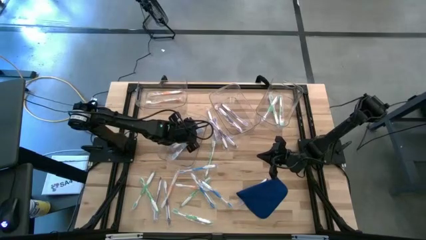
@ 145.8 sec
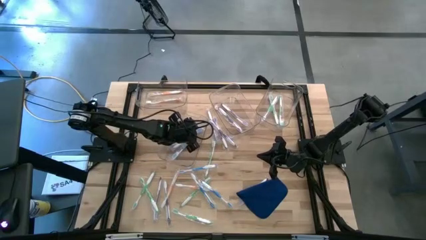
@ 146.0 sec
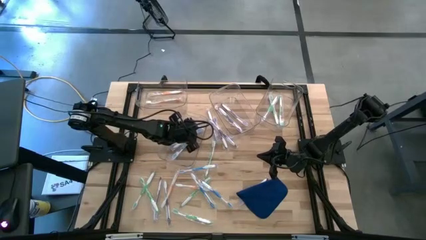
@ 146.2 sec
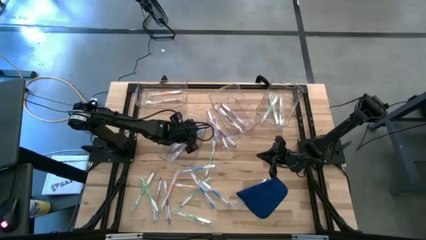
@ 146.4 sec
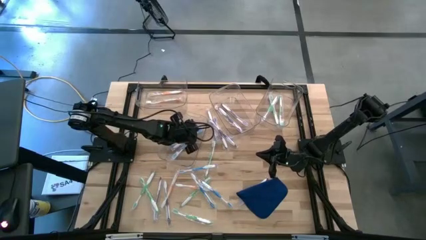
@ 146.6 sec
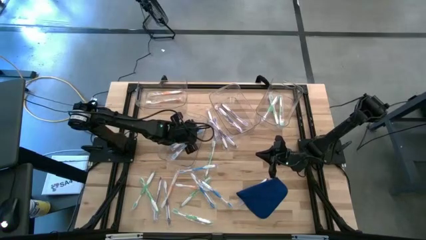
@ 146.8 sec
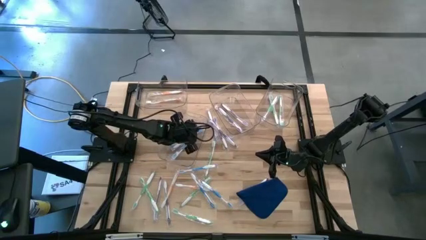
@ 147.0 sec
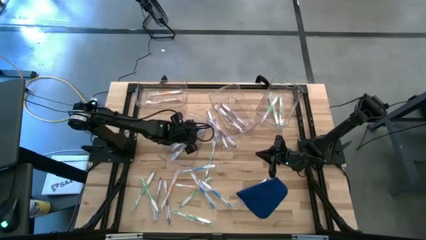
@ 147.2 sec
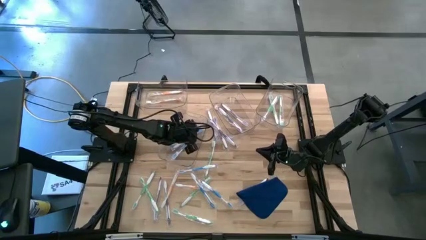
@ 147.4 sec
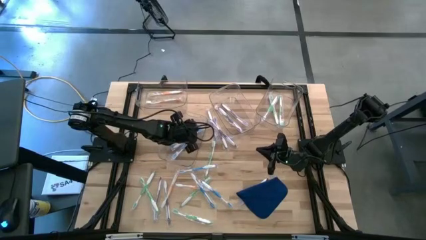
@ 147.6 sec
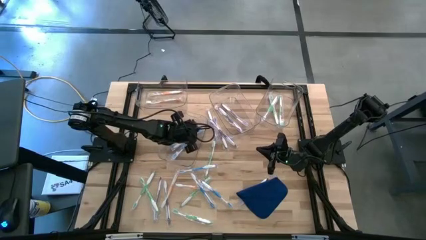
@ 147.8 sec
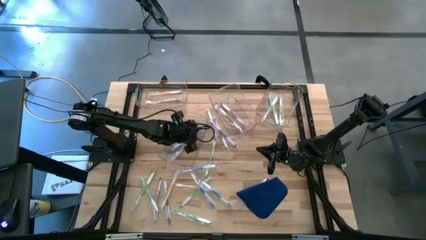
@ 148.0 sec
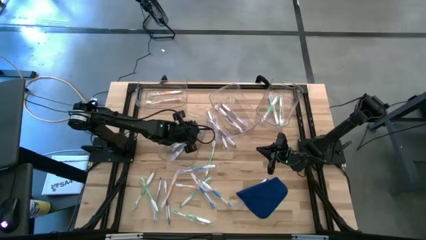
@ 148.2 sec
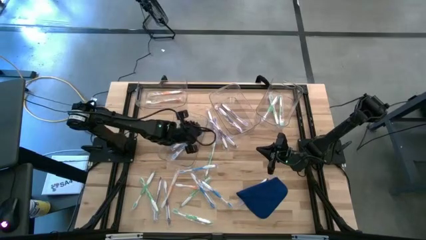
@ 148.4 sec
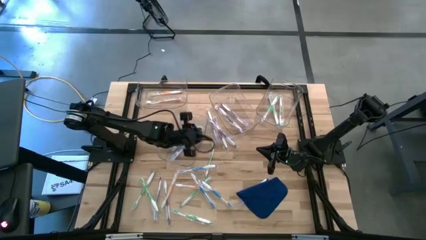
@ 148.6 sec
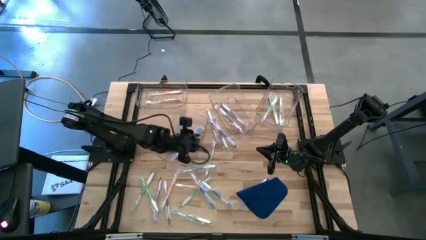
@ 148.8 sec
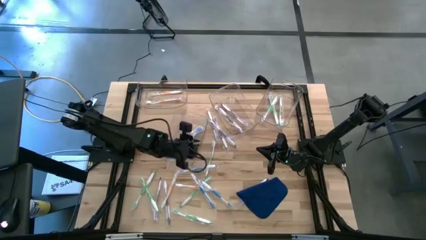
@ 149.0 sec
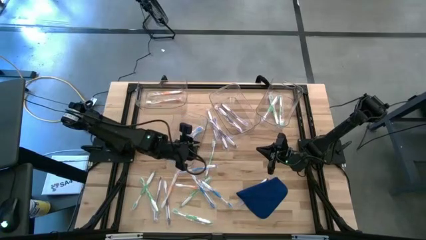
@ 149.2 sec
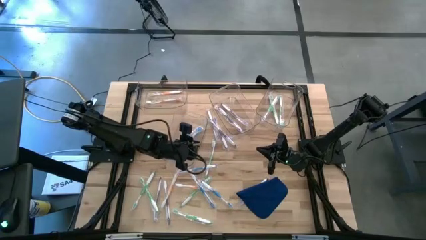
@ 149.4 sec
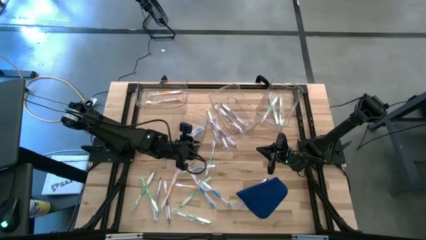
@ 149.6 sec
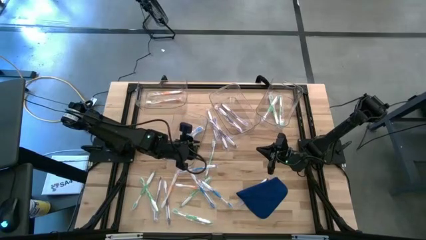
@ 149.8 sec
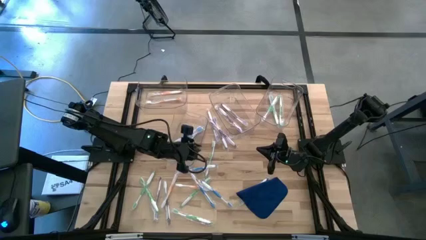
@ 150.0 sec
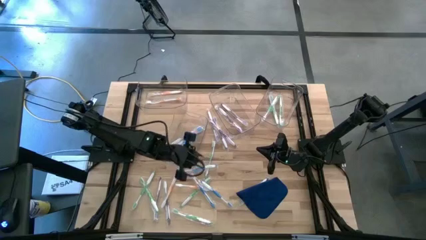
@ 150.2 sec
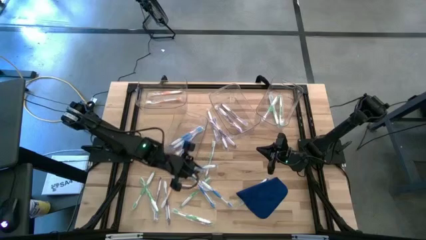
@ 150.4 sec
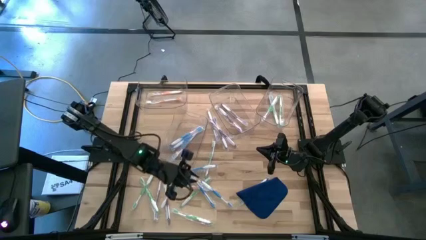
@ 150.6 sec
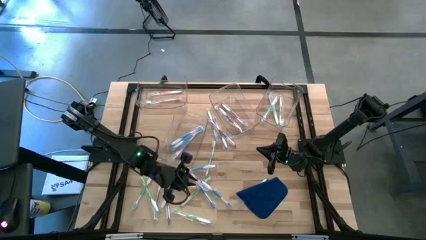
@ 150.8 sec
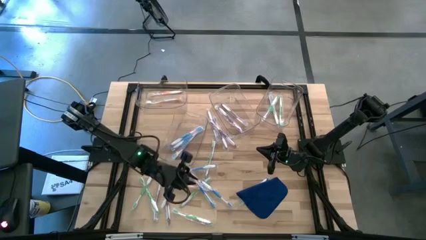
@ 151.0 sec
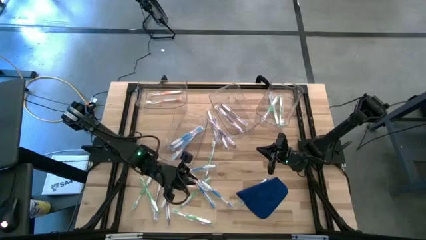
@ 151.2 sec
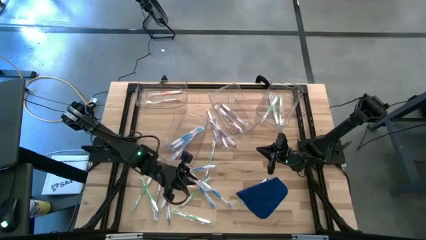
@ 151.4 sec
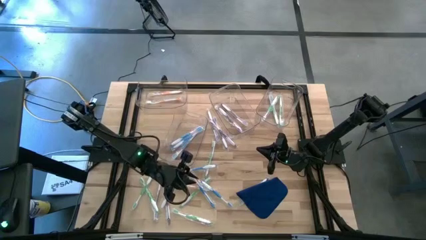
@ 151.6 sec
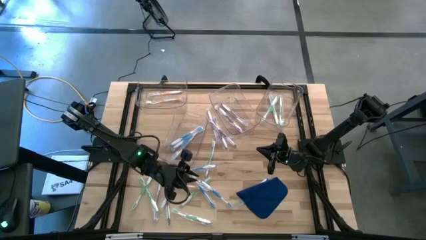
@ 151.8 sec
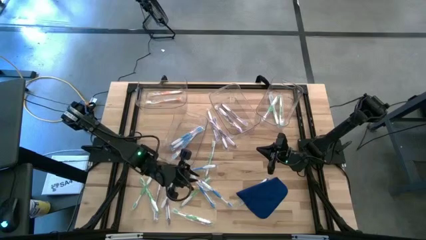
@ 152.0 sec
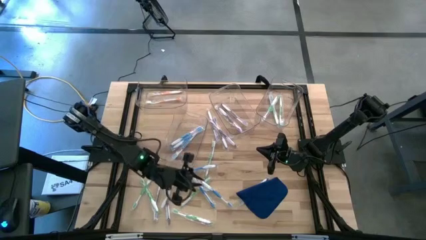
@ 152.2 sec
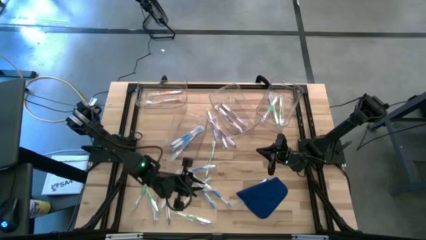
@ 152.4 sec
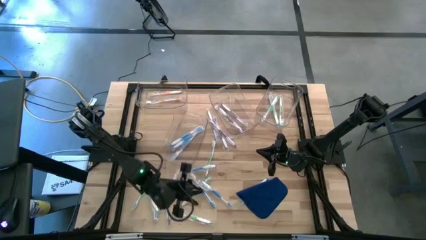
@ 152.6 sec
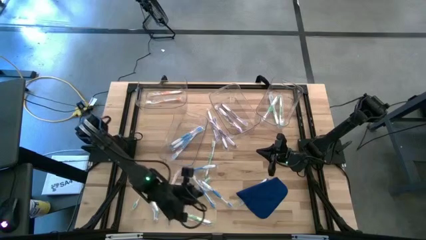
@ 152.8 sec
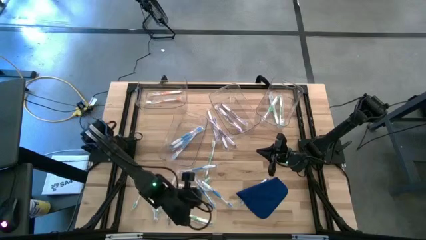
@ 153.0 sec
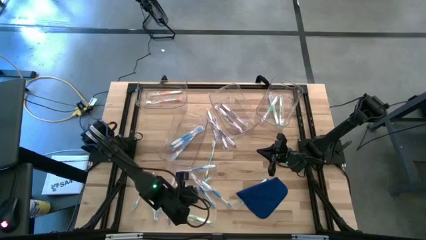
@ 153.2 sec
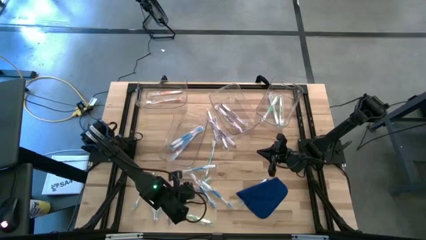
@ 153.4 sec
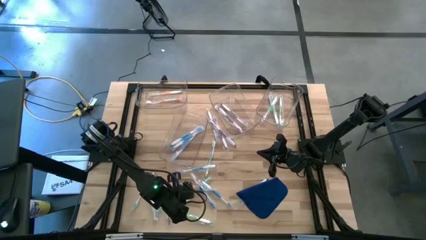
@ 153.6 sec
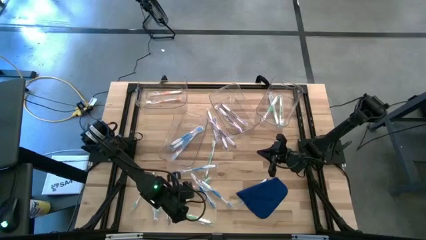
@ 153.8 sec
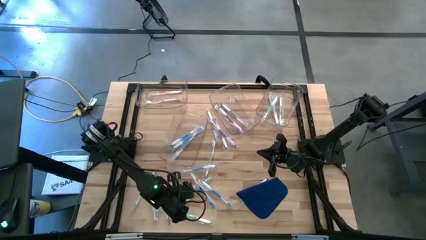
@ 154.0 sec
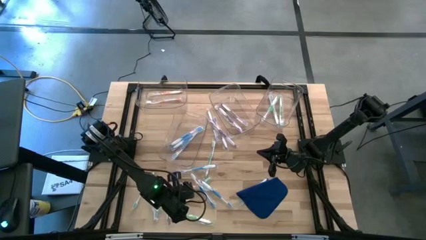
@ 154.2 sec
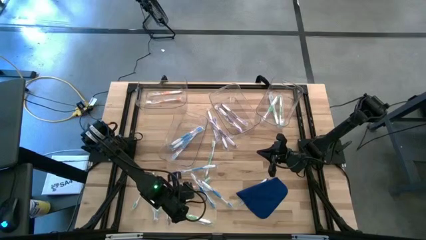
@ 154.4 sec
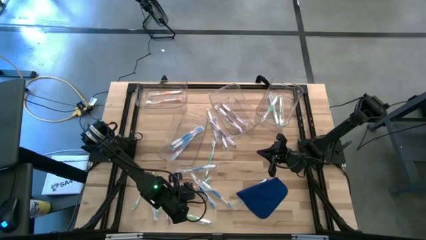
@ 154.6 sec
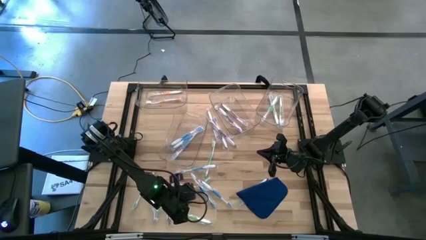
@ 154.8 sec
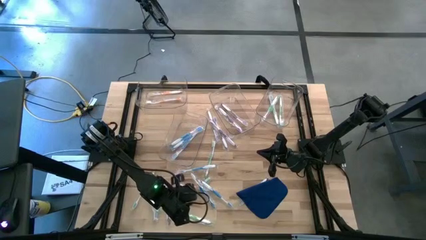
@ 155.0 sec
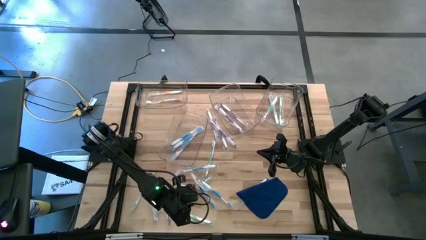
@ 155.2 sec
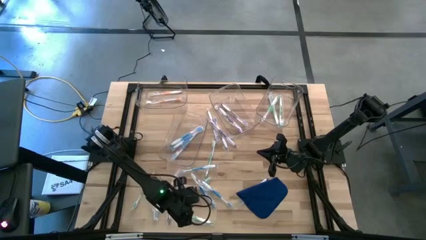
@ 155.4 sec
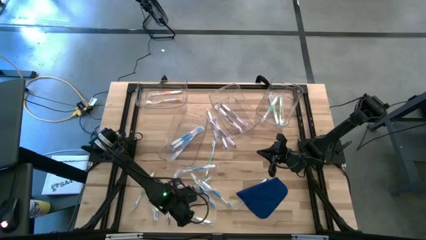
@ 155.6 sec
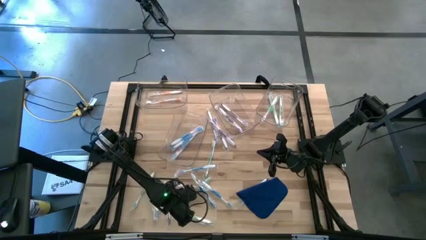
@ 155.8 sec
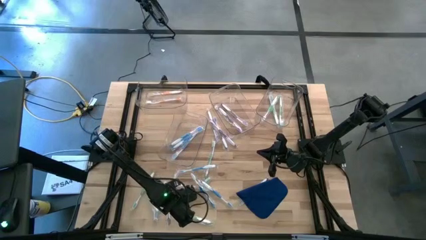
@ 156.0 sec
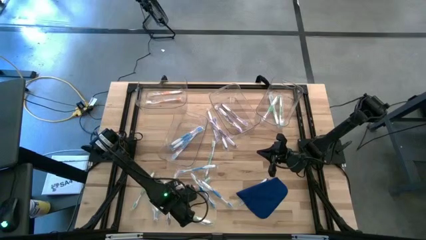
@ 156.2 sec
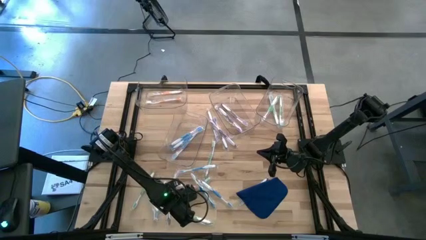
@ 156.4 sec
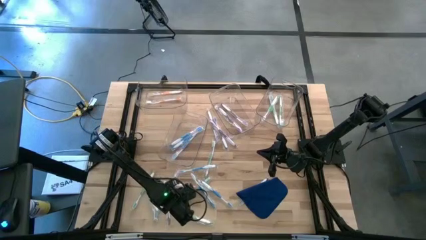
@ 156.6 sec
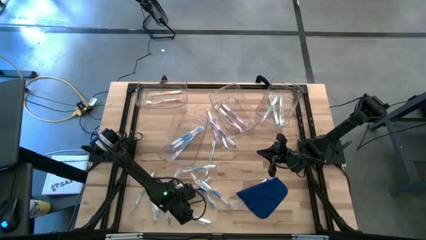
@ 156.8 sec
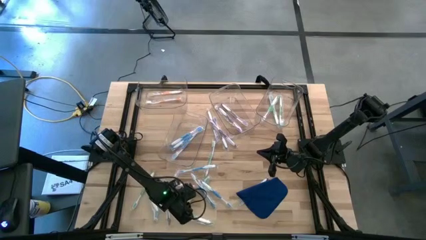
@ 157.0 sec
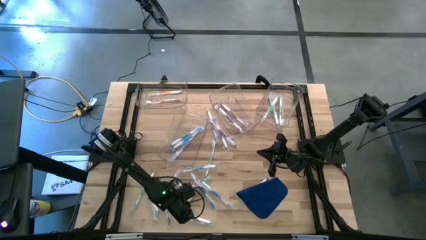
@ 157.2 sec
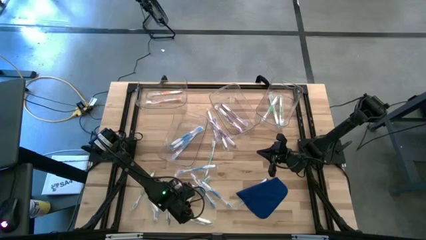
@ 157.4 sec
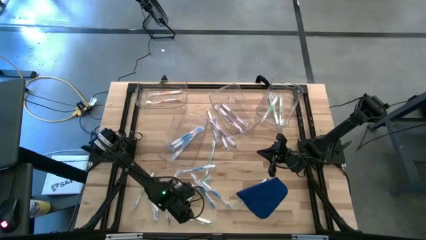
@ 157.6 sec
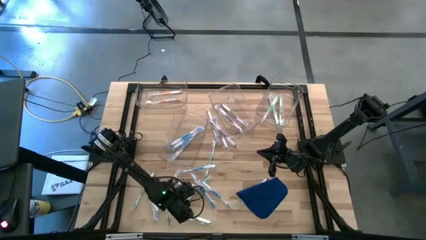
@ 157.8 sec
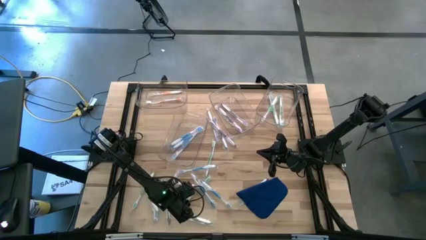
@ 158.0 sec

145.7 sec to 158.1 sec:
Task: Pick & Place Toothbrushes
Put the green toothbrush into the top right transparent bin
